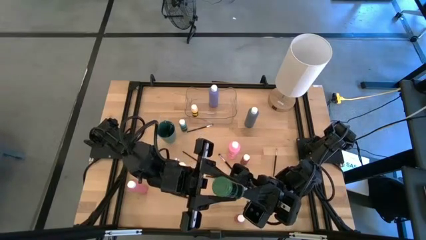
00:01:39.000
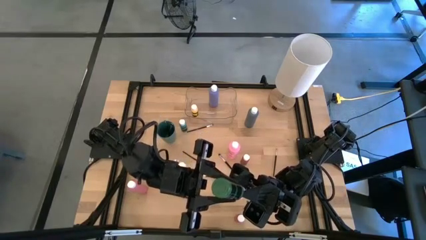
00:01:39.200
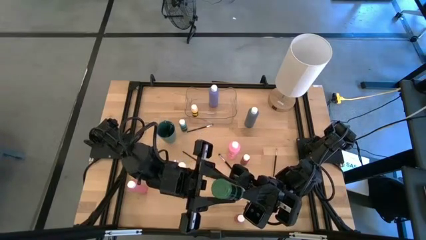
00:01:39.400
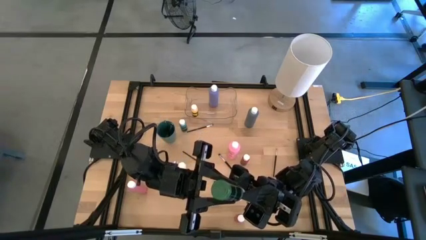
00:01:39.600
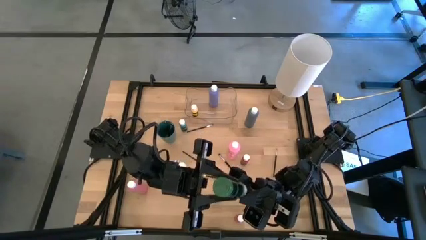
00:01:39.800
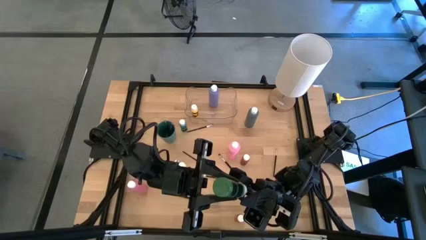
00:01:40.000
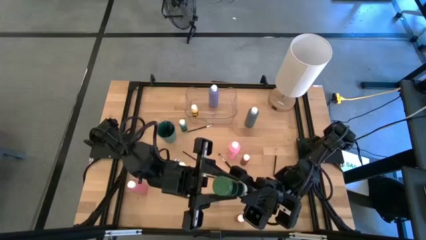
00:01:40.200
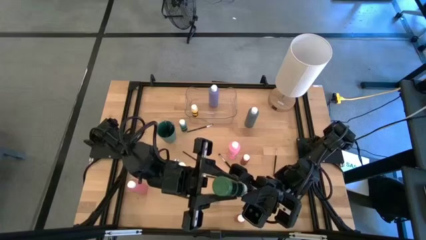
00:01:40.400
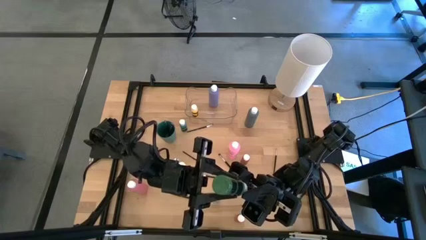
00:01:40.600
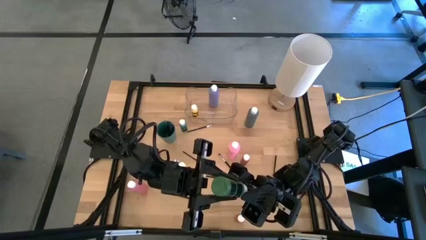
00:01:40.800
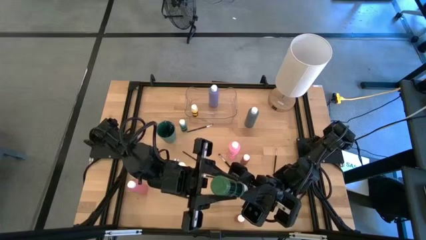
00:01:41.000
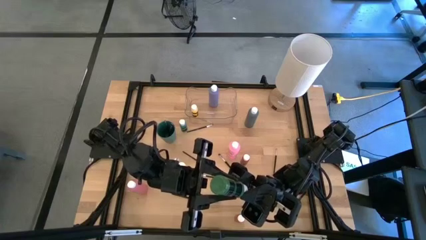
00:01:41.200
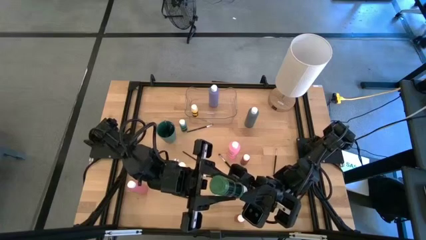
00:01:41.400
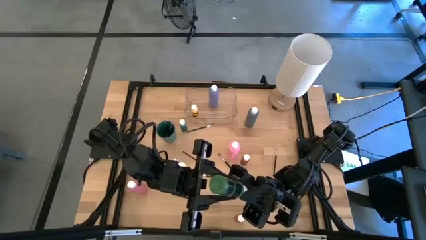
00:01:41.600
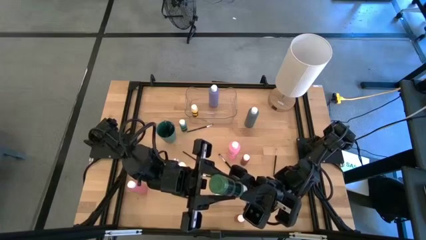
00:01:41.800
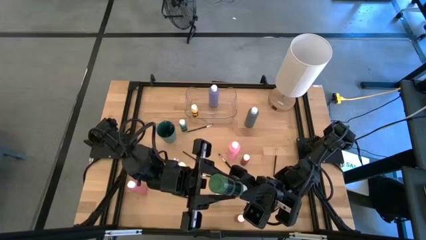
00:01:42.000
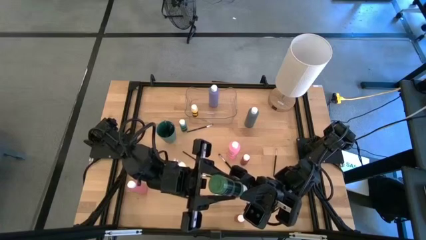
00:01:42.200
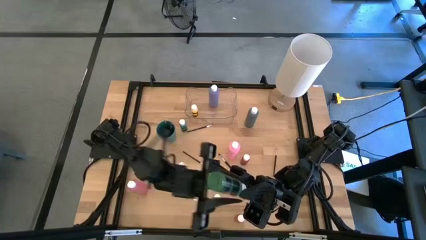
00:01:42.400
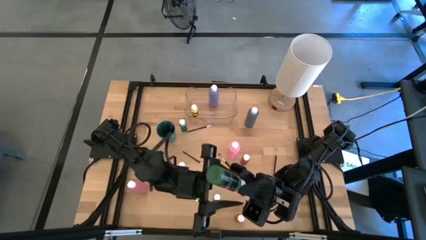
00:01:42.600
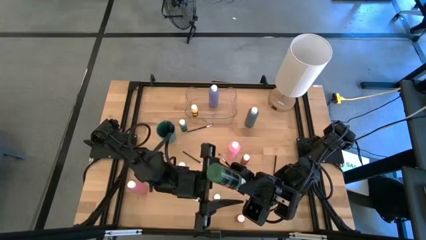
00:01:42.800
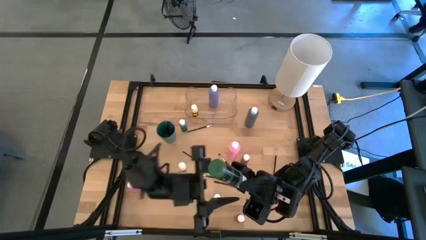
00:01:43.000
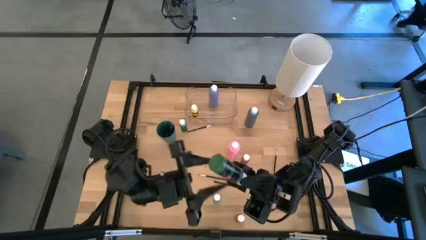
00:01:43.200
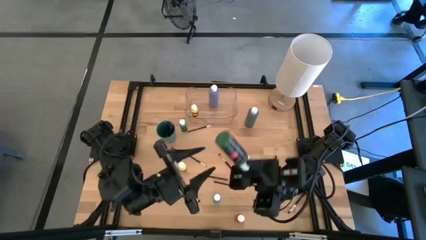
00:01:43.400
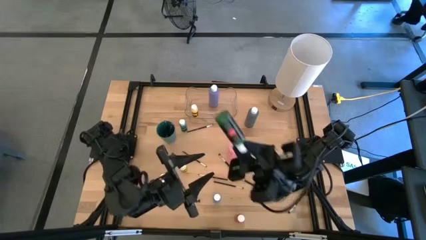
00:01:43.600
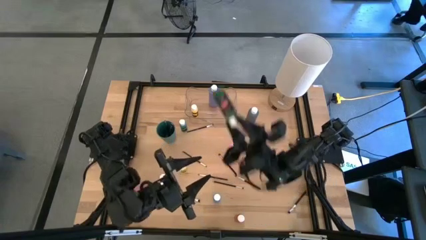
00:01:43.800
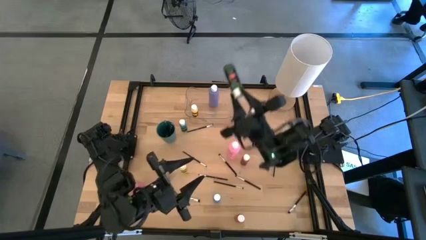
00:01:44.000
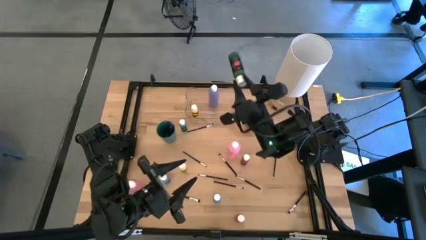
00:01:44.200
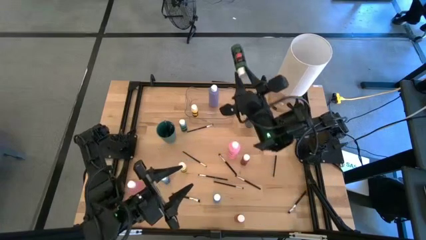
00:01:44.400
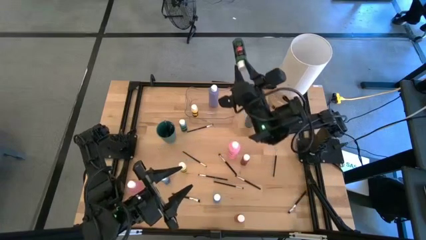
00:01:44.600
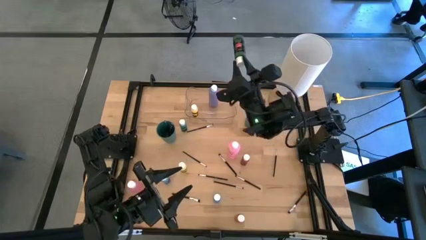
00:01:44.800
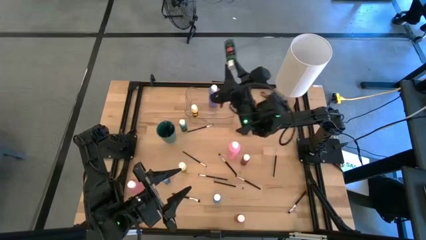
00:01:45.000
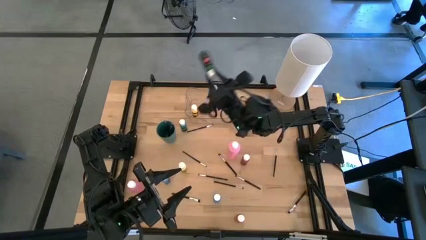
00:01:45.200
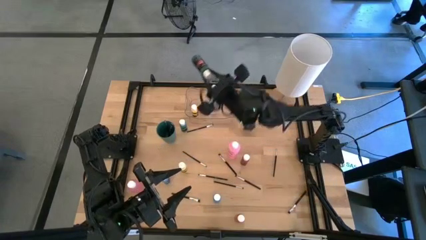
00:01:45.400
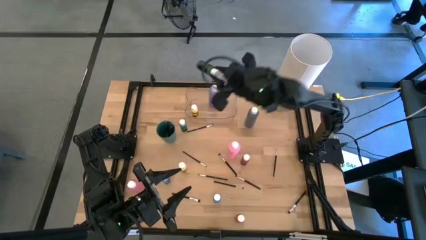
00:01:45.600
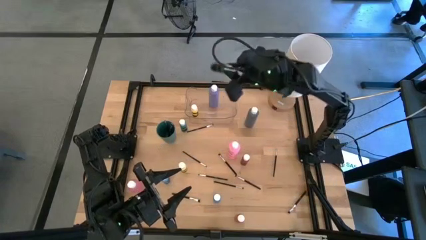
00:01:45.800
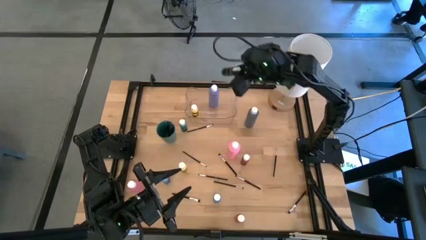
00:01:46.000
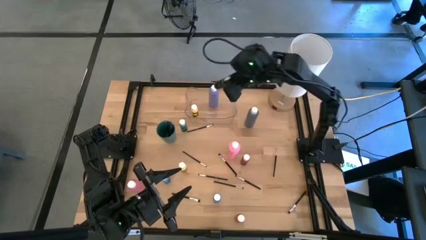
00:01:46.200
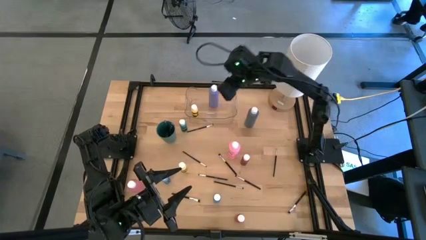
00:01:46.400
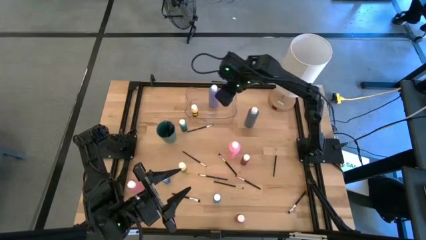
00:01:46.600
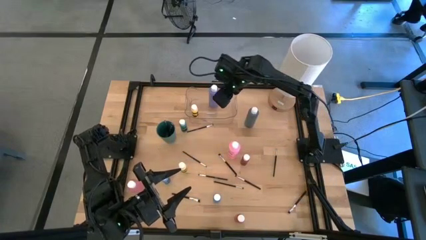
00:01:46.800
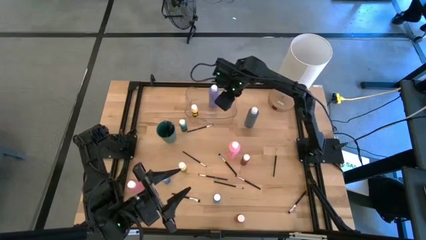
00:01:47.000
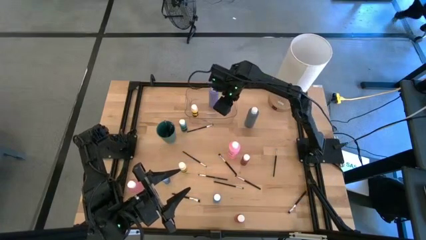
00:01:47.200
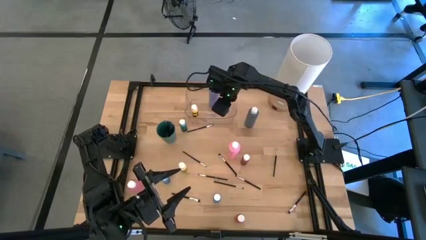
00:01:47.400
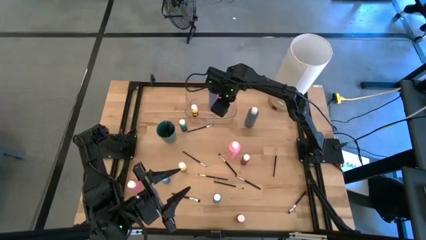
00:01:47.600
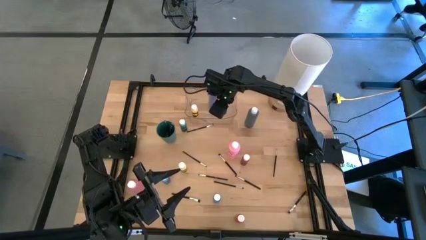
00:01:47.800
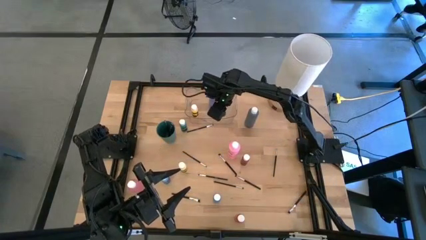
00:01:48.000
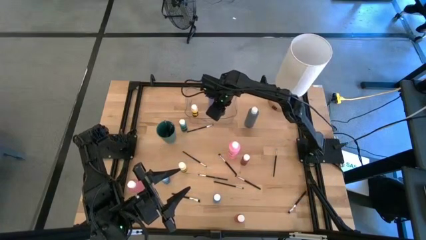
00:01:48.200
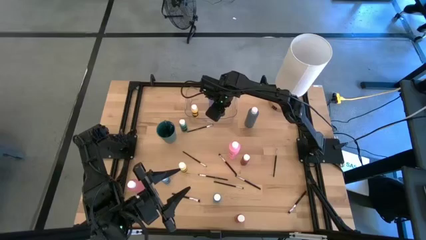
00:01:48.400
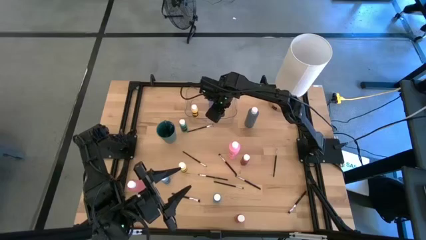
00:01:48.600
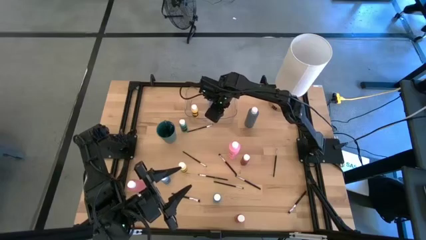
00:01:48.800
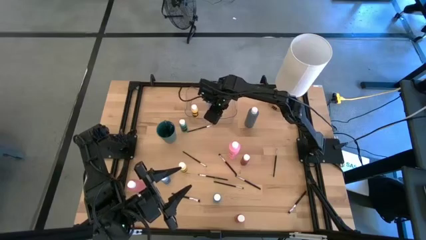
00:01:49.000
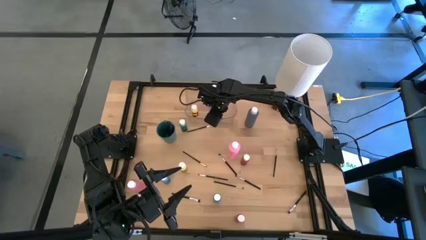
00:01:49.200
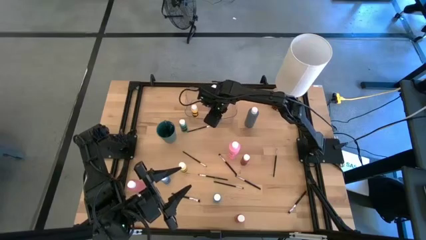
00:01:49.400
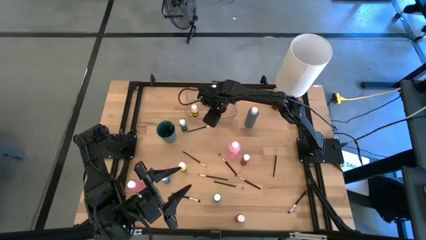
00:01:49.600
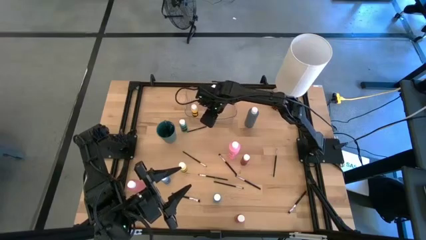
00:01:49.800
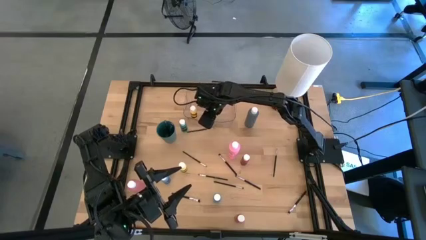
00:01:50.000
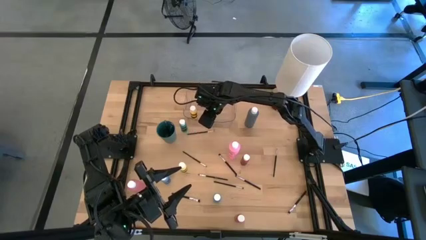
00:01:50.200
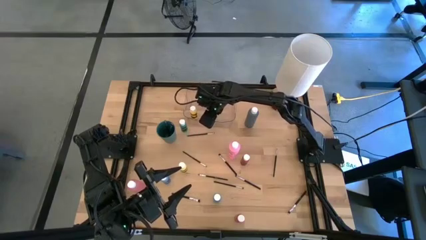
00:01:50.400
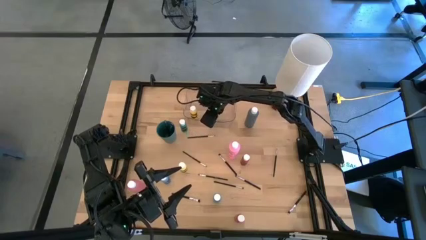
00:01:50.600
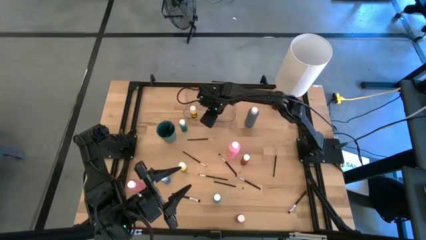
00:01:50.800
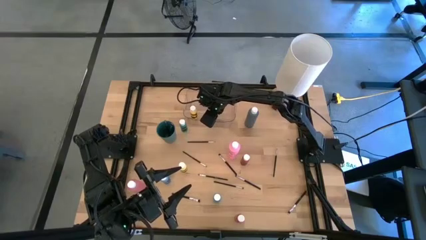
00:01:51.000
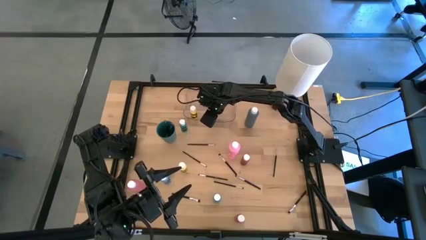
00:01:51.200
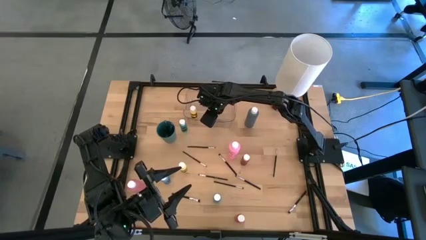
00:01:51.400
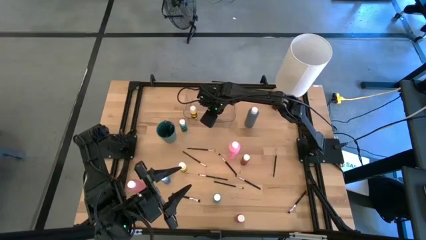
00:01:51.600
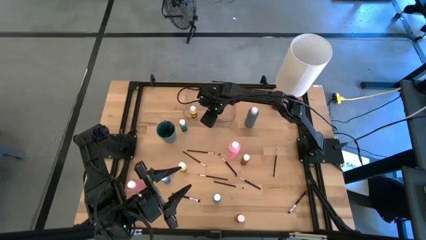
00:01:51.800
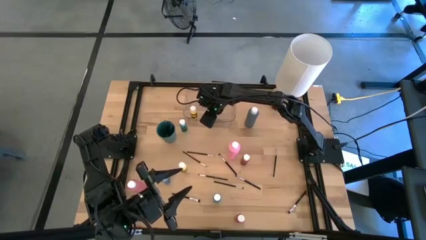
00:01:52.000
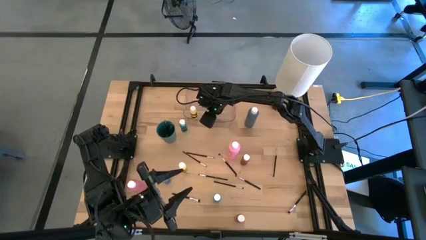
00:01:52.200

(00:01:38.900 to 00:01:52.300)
Task: Pick & Place Paint Supplies
Put the green paint bottle into the transparent bin

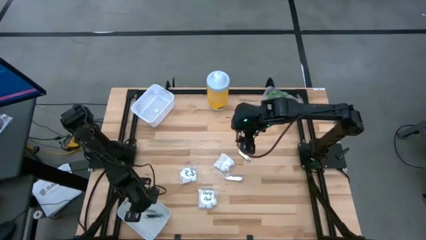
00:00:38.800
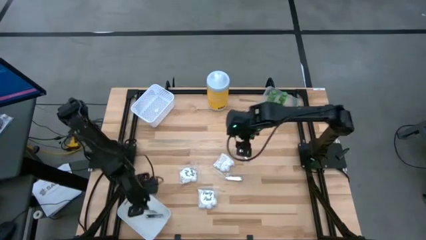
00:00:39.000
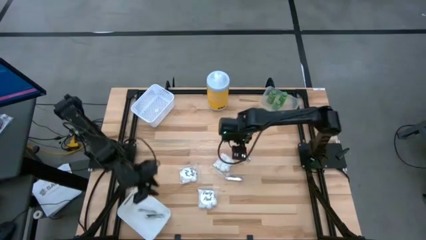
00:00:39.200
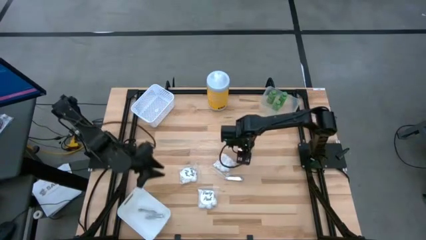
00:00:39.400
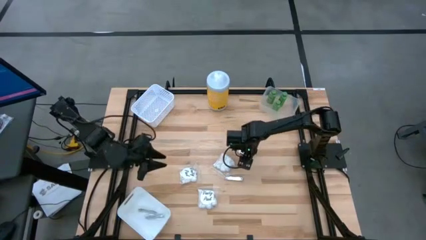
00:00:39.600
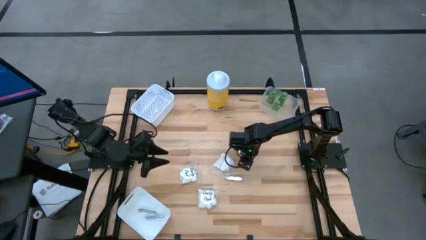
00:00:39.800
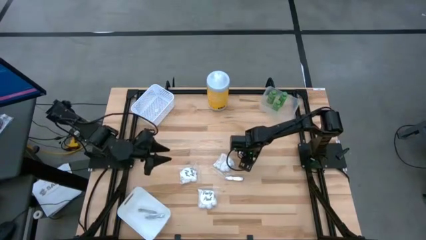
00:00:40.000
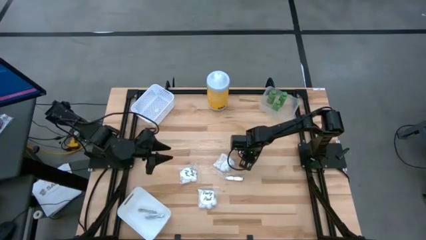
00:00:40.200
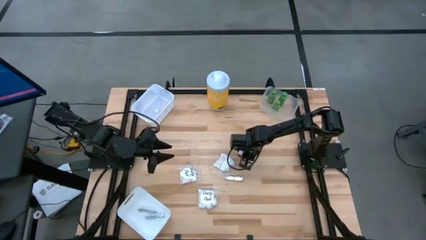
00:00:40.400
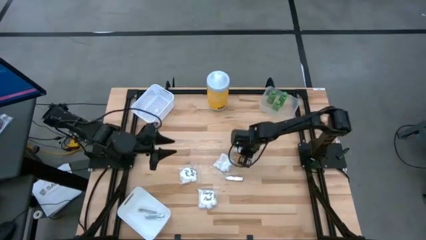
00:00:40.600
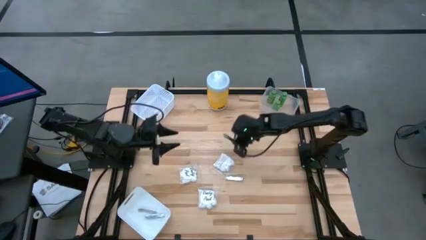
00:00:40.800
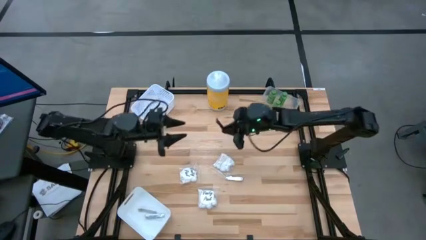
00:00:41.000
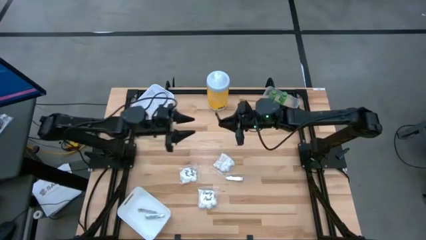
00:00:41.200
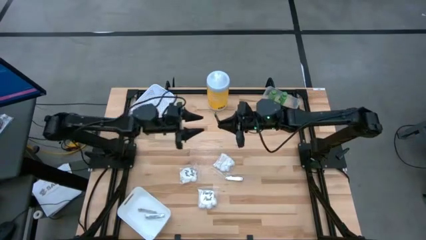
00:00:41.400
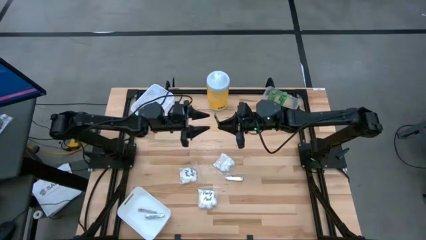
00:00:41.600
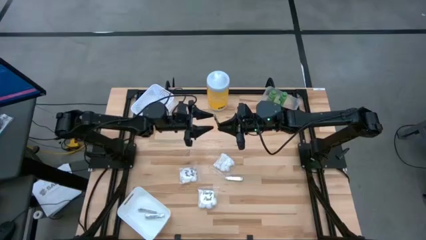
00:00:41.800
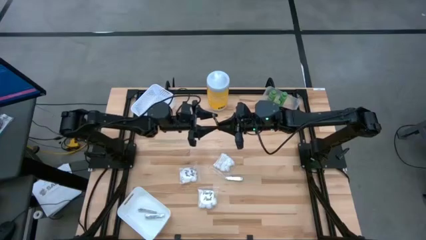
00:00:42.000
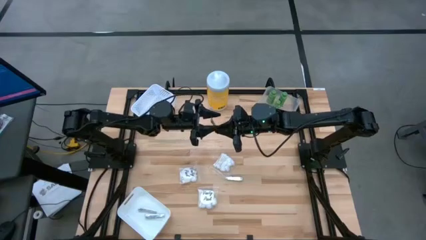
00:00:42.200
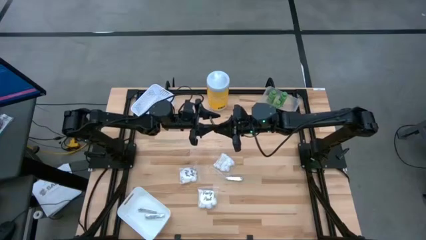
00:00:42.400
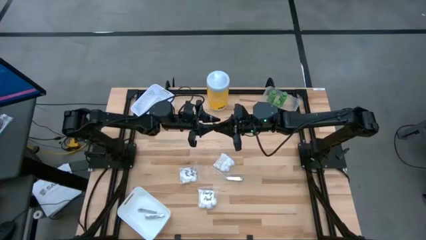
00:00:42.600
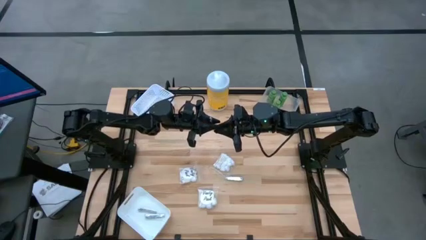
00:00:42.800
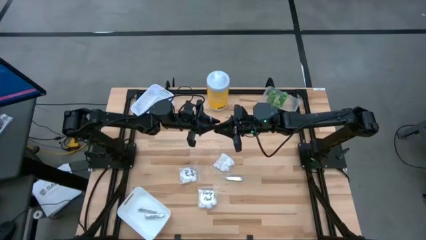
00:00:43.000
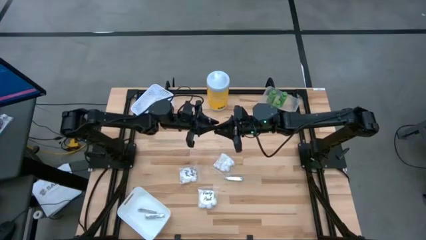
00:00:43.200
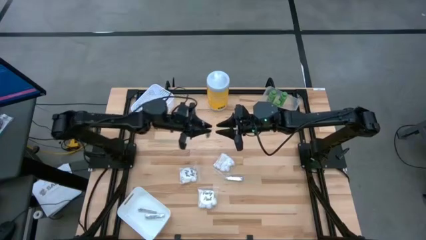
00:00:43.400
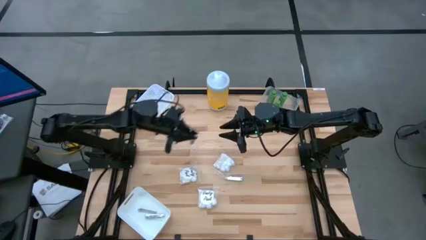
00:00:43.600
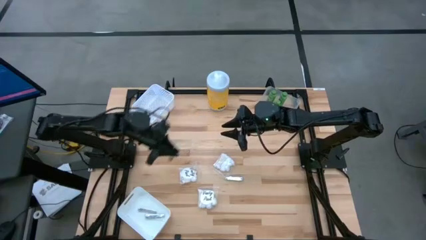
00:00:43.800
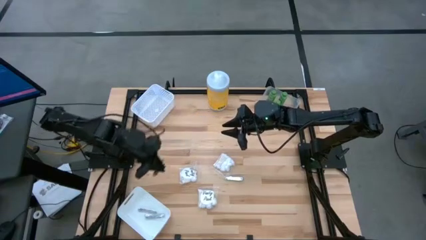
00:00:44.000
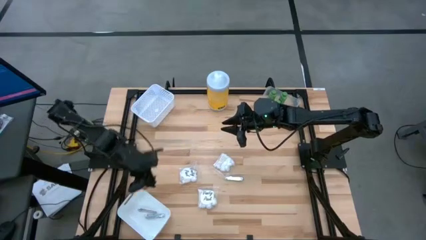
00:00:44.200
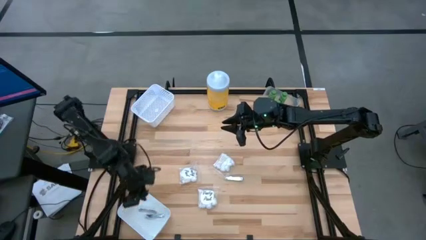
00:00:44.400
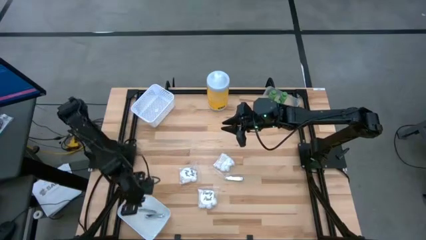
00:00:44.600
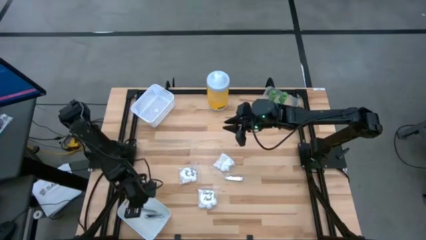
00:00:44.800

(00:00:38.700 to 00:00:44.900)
Task: Pick & Place Travel size toiletries
Put the silver nail cutter into the white bin
